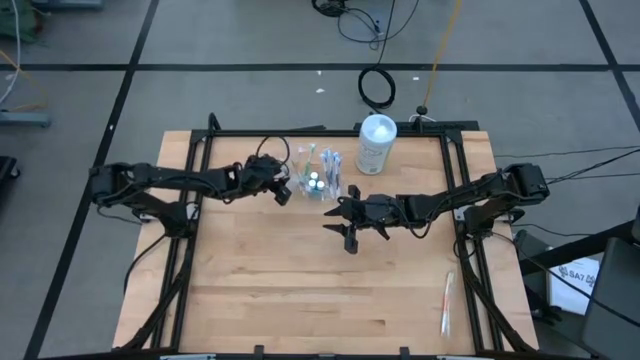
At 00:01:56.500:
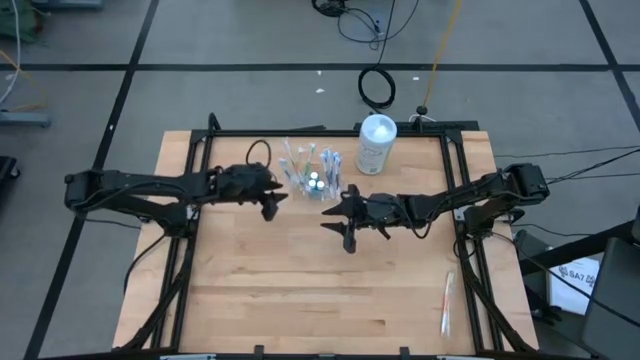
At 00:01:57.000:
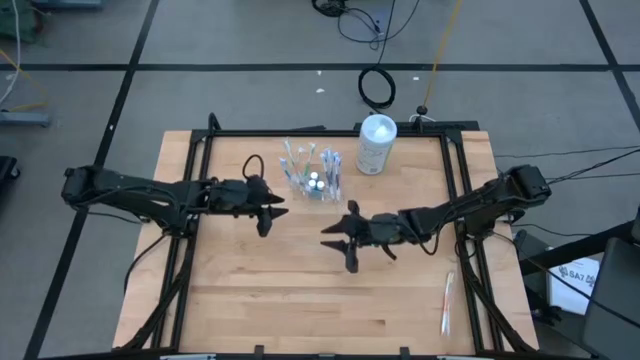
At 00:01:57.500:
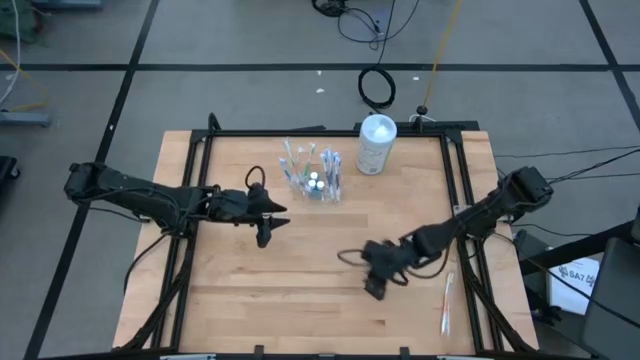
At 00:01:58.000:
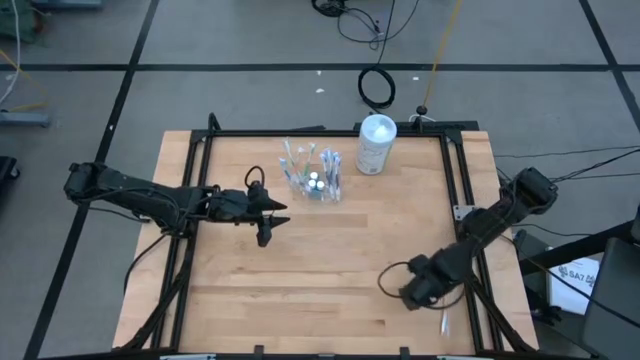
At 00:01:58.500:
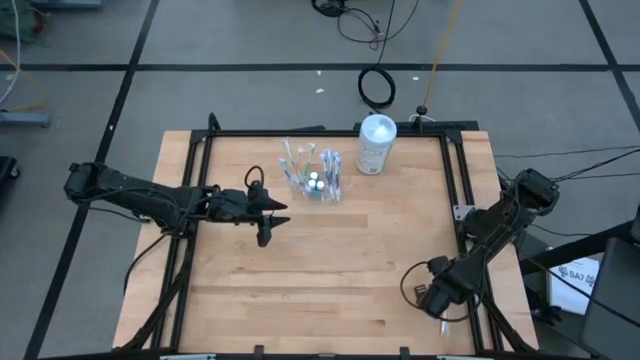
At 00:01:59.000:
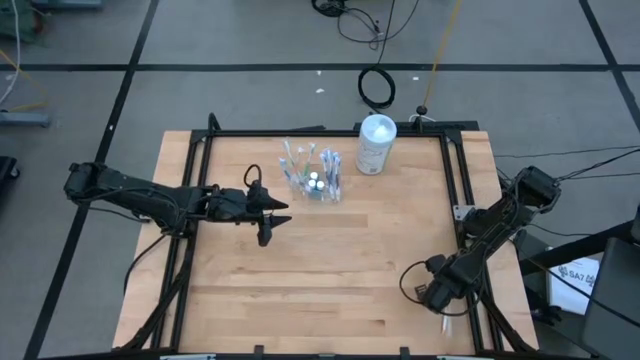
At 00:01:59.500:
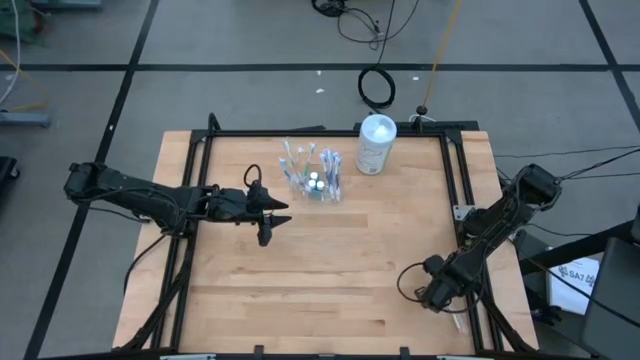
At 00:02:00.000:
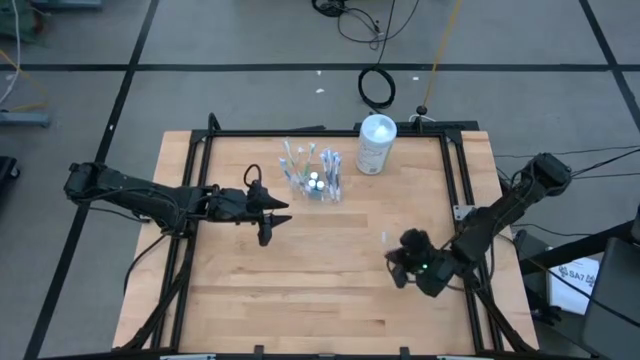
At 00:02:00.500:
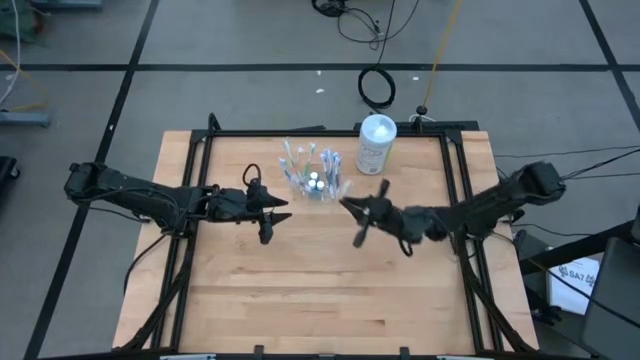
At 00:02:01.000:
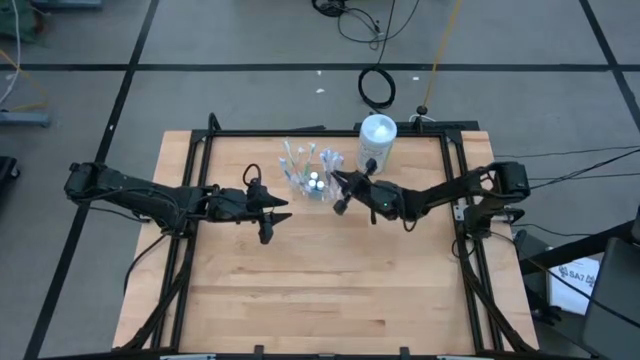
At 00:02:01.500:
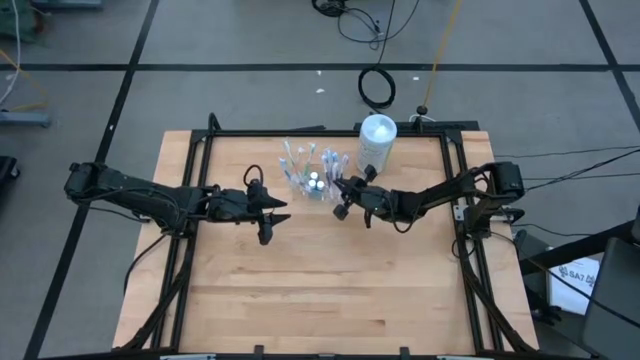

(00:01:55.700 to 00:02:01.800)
Task: Pick & Place toothbrushing station
Put the orange toothbrush in the right compartment of the transparent organizer

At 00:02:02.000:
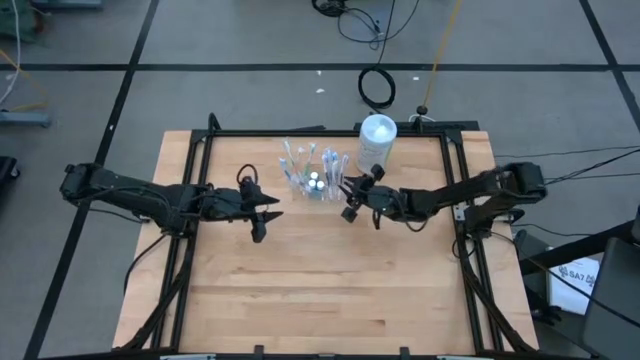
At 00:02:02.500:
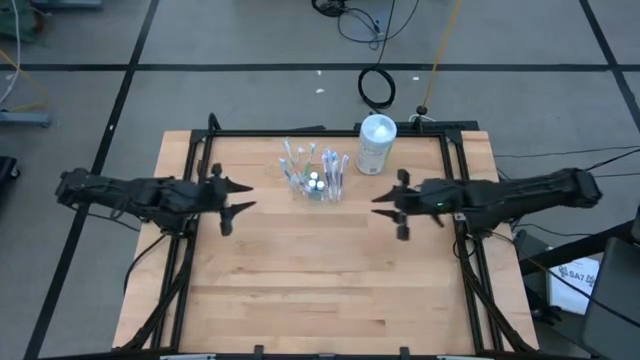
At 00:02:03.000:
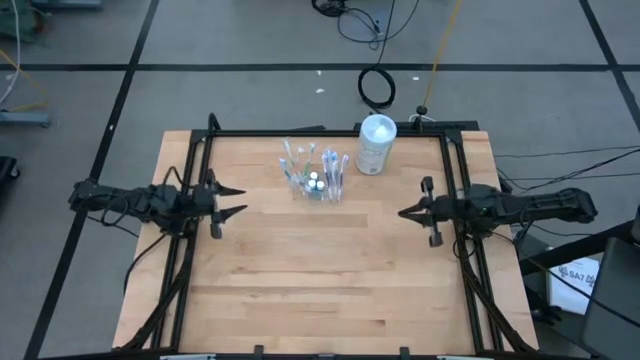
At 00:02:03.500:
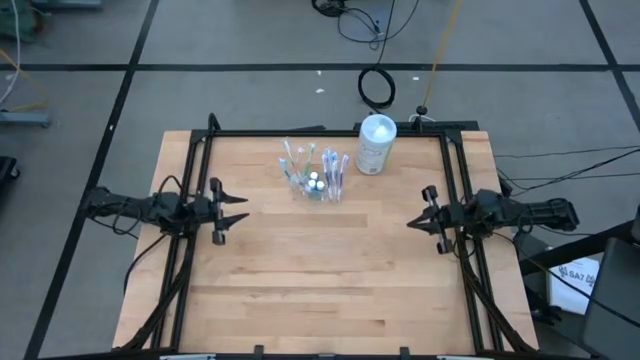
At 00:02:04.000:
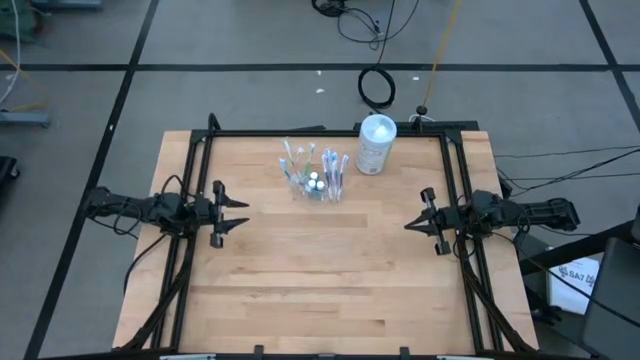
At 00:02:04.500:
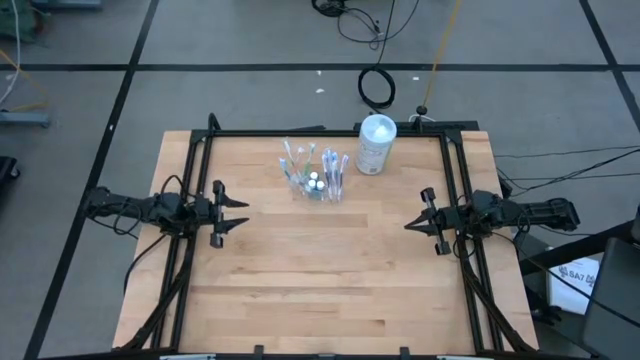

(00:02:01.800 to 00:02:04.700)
Return to Home Position

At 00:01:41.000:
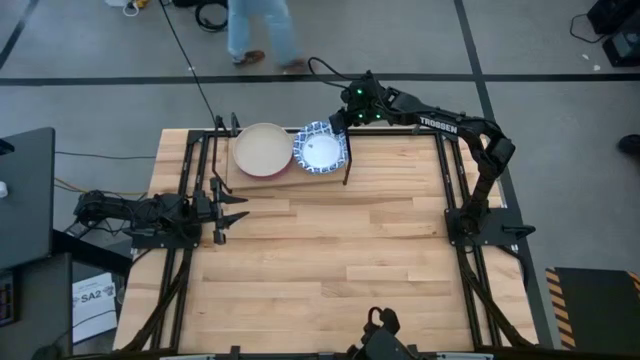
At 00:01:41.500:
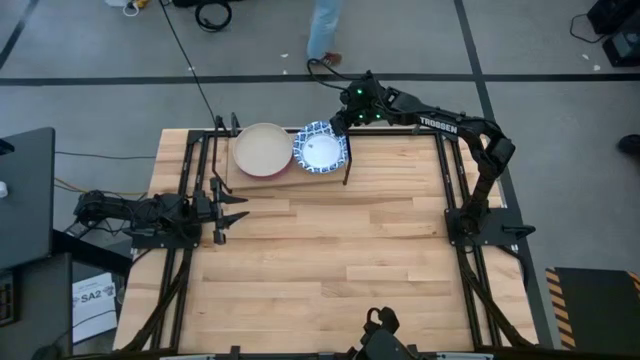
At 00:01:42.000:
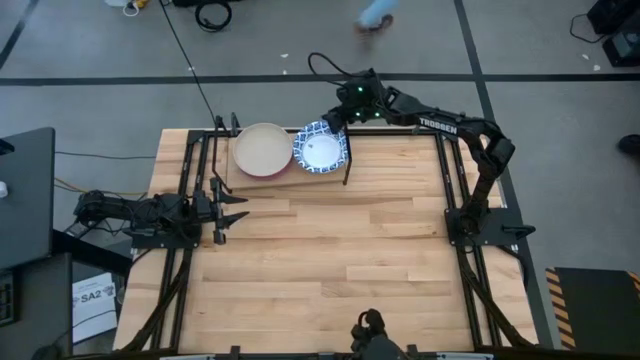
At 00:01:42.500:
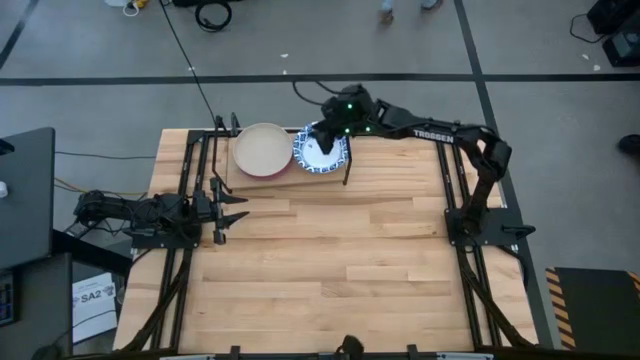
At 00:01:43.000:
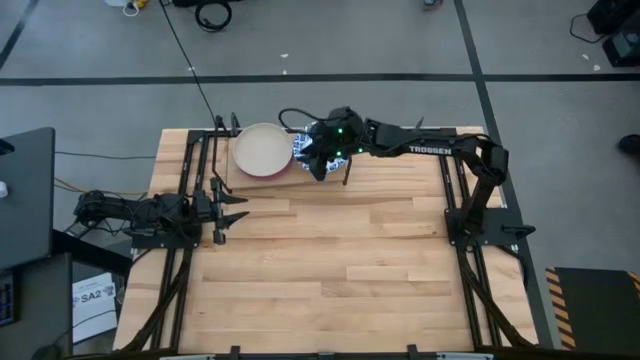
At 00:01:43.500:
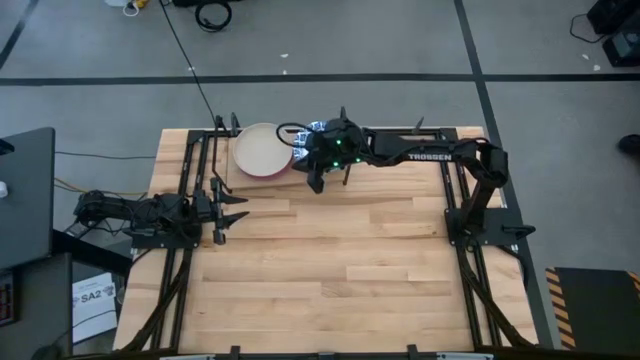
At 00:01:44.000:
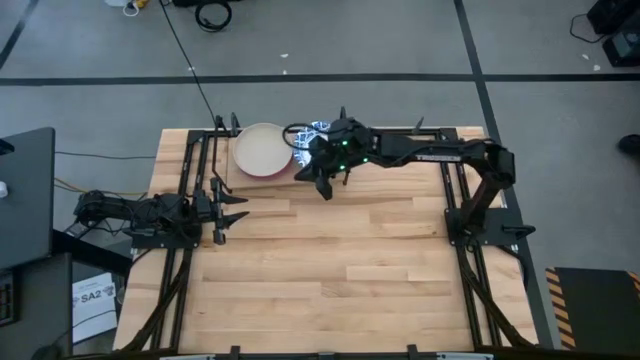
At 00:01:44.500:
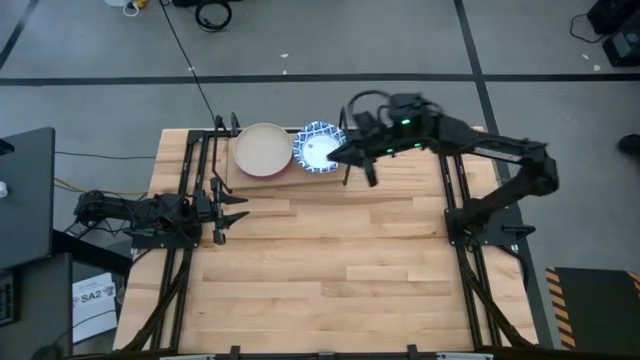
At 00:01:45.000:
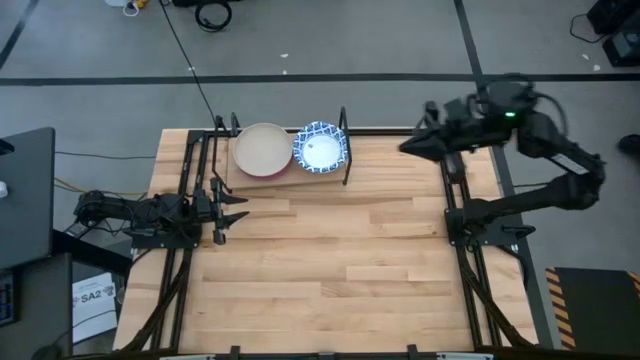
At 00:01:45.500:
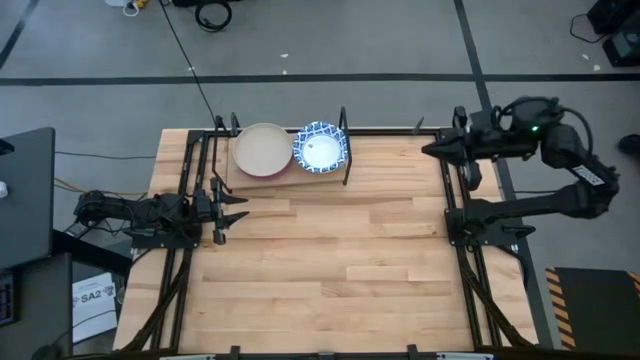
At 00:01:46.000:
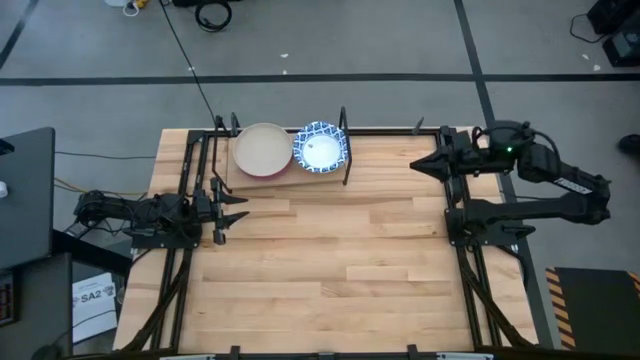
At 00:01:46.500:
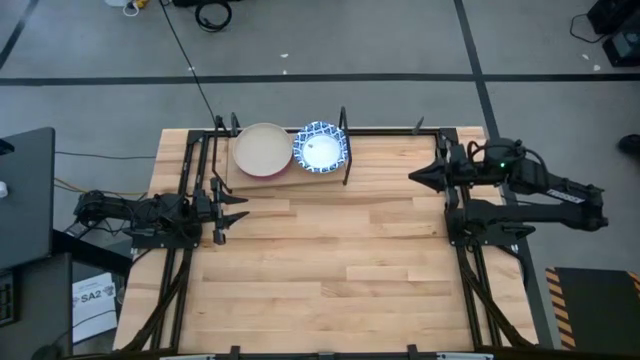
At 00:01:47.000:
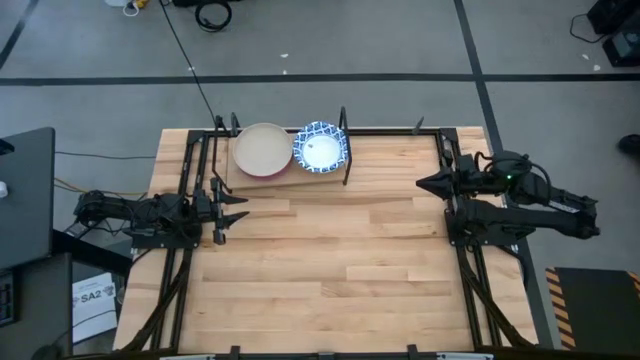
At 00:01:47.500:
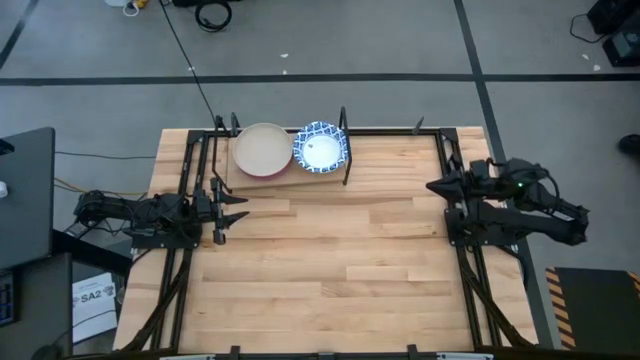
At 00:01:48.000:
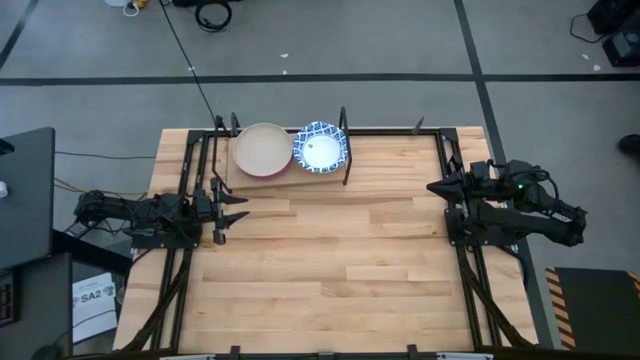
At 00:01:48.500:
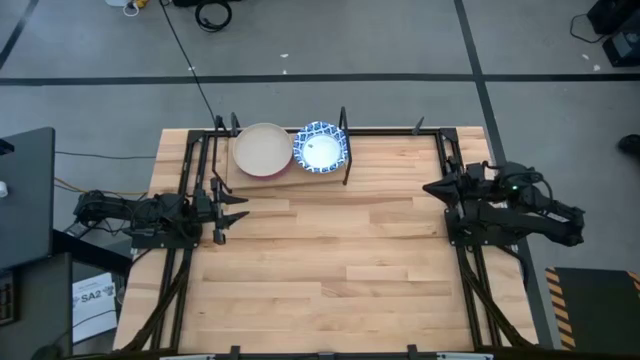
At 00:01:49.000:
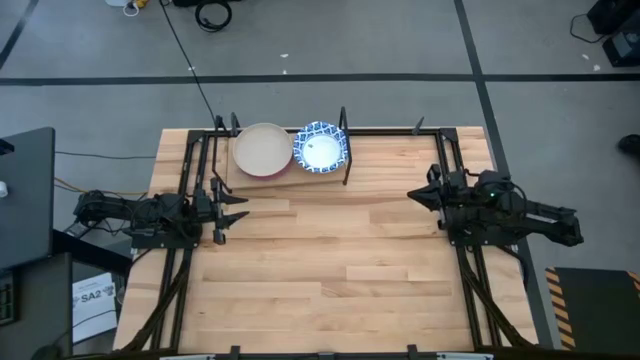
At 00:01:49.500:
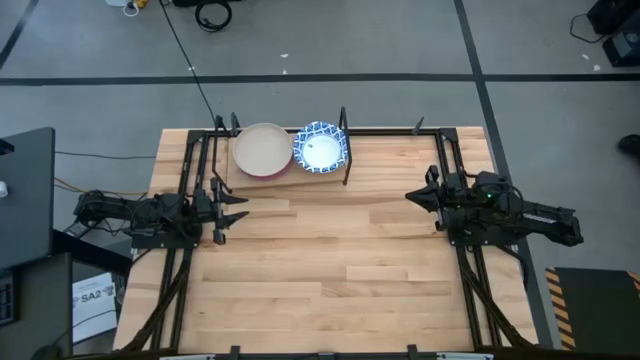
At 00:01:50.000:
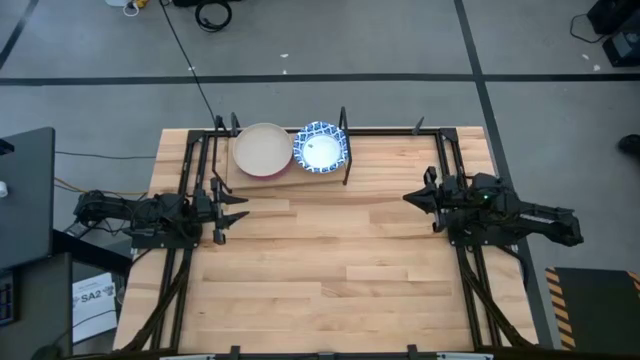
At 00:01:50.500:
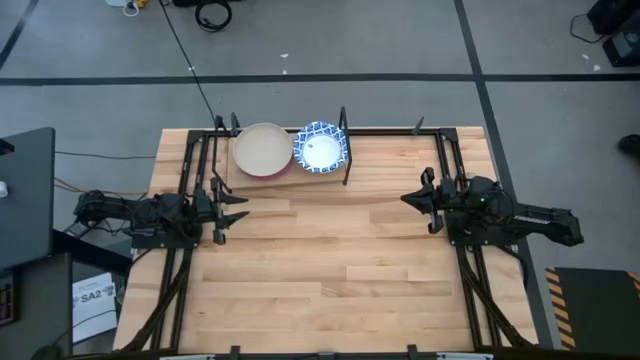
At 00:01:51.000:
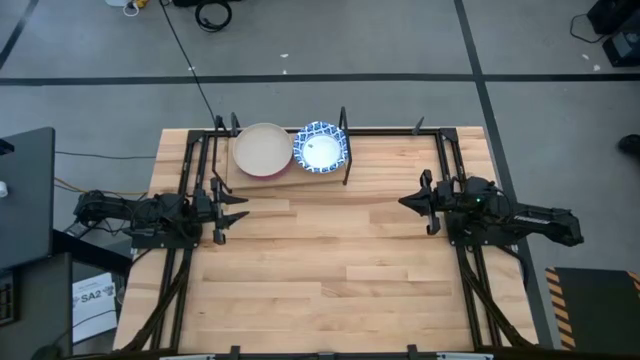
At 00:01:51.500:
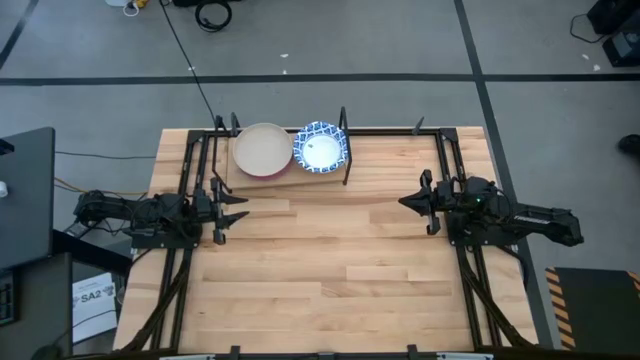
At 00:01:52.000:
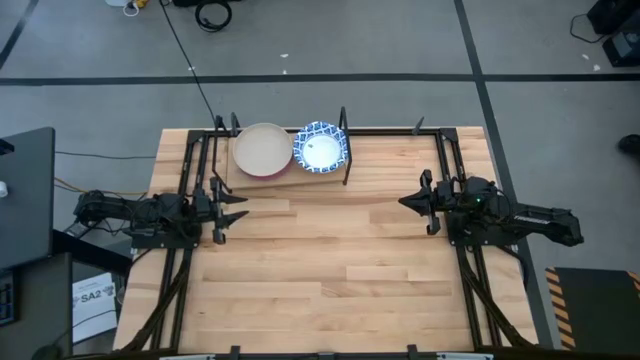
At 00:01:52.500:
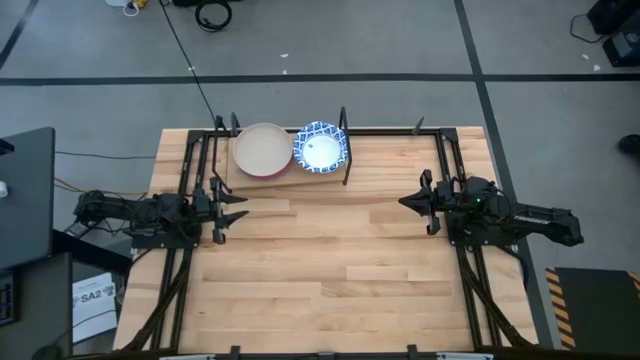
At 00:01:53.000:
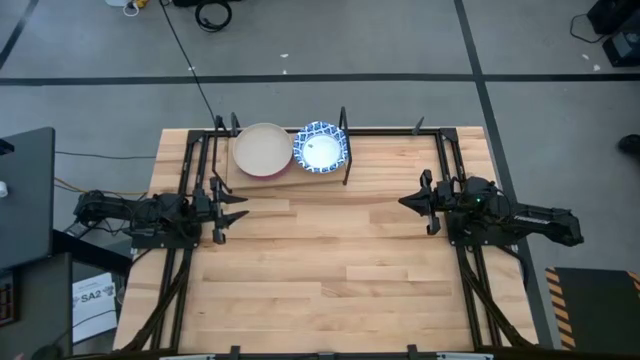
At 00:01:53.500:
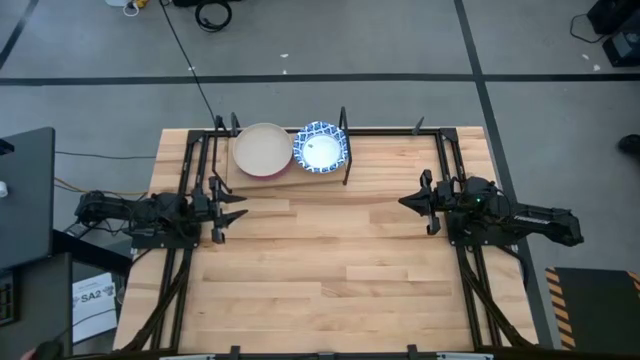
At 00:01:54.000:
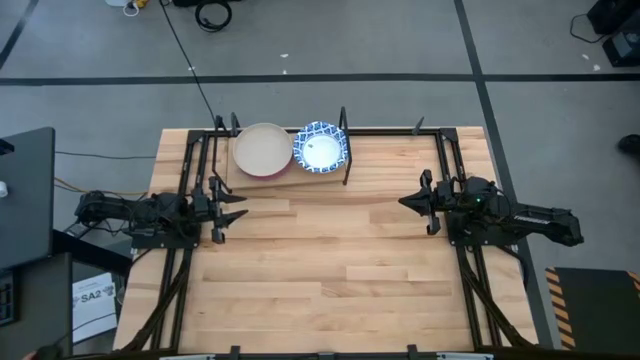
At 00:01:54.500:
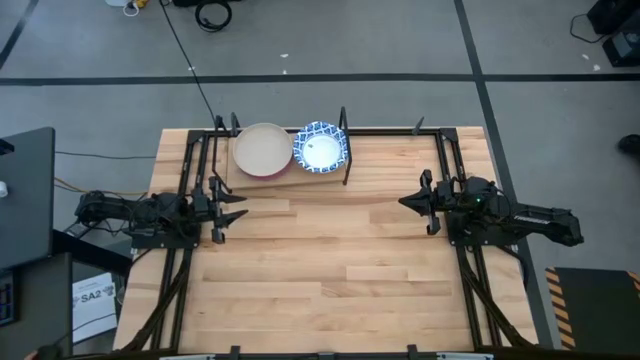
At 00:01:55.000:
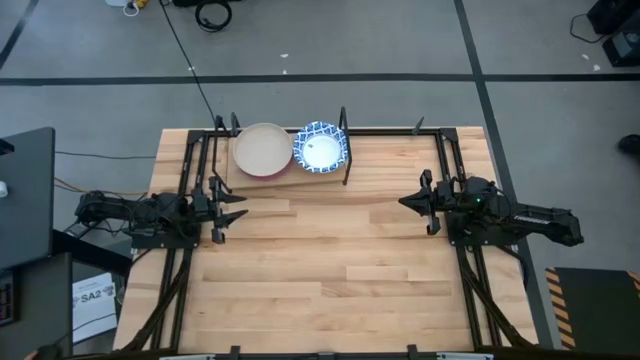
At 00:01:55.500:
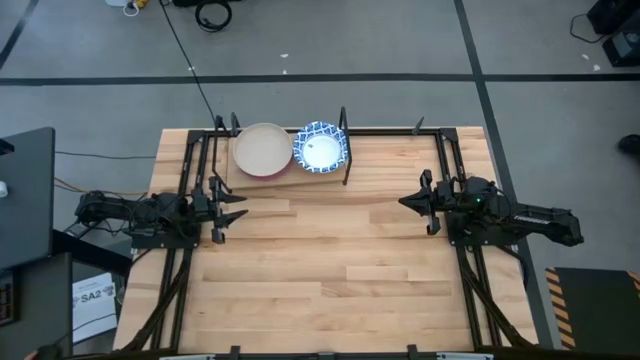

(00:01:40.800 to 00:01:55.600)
Task: Place and stack plates onto a shelf
Return to Home Position
